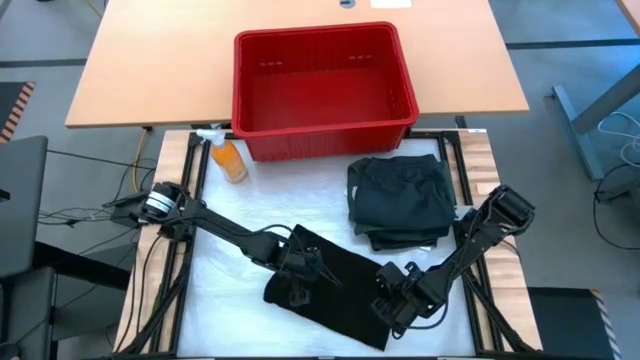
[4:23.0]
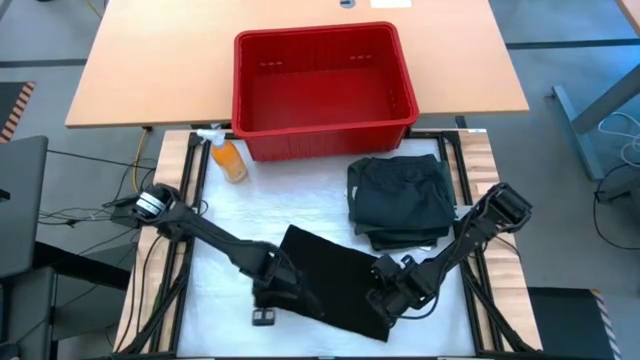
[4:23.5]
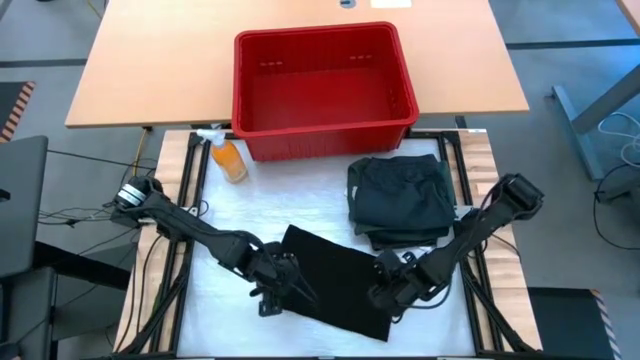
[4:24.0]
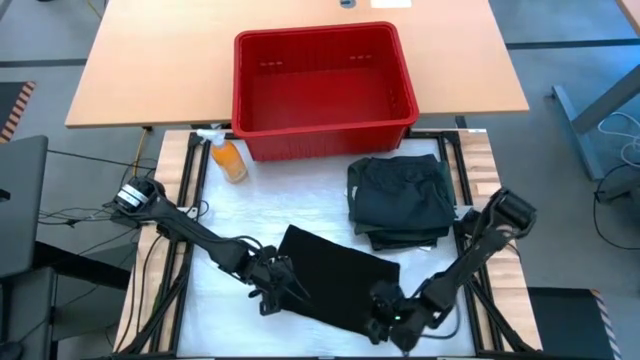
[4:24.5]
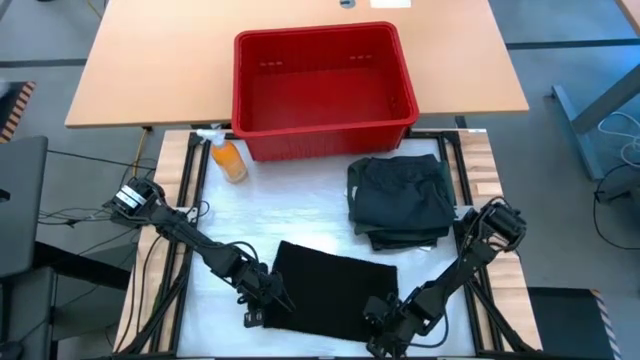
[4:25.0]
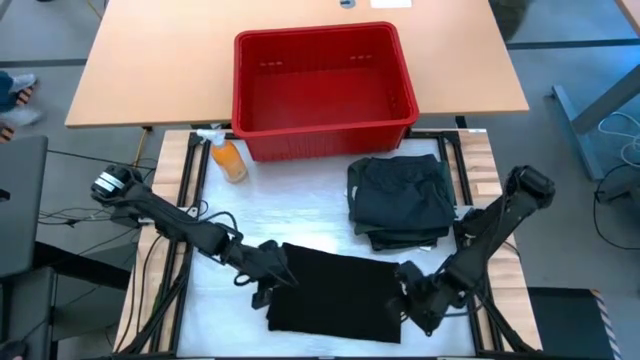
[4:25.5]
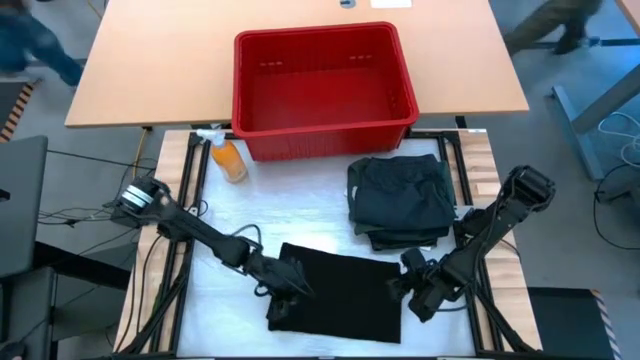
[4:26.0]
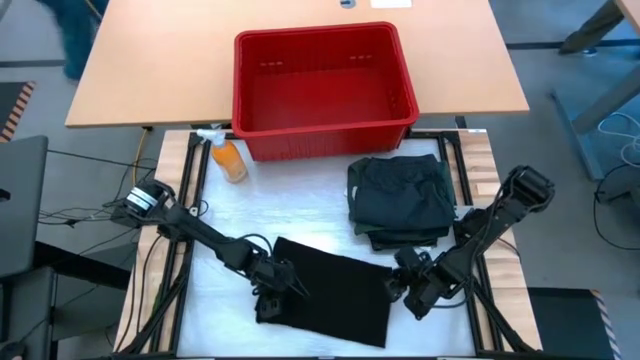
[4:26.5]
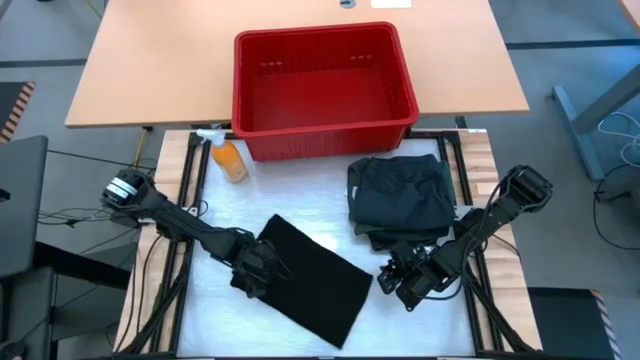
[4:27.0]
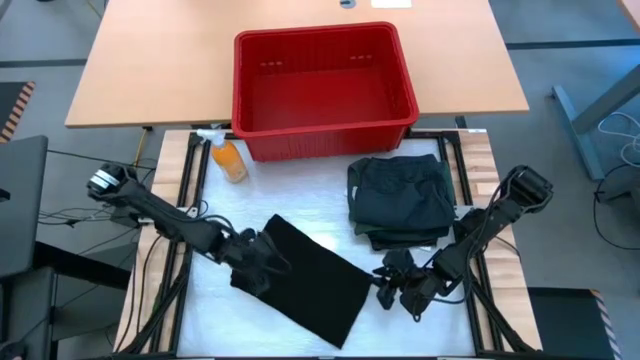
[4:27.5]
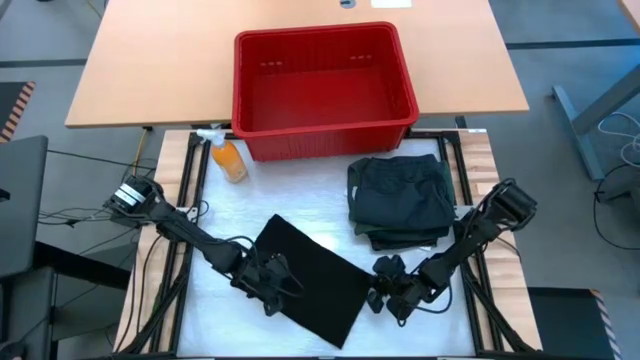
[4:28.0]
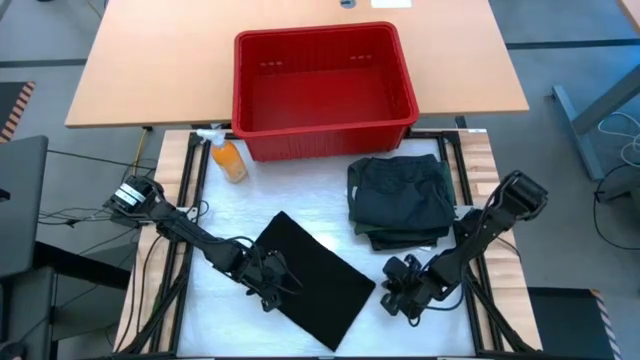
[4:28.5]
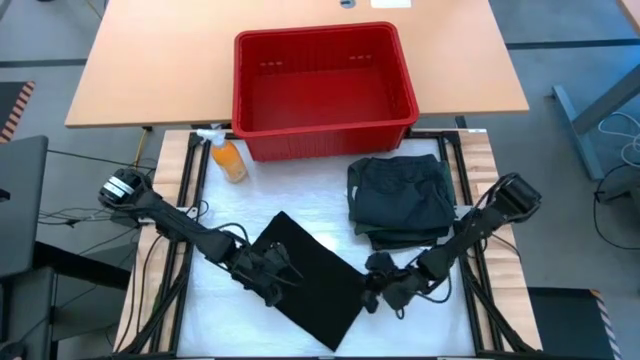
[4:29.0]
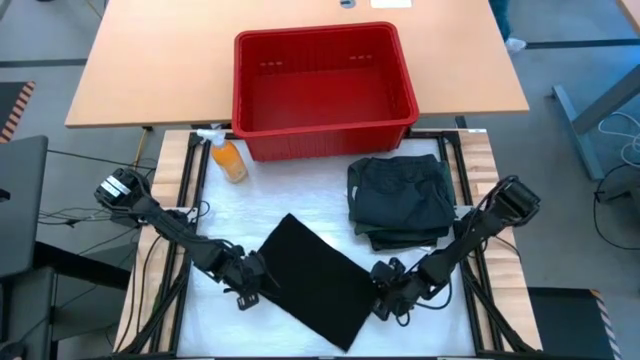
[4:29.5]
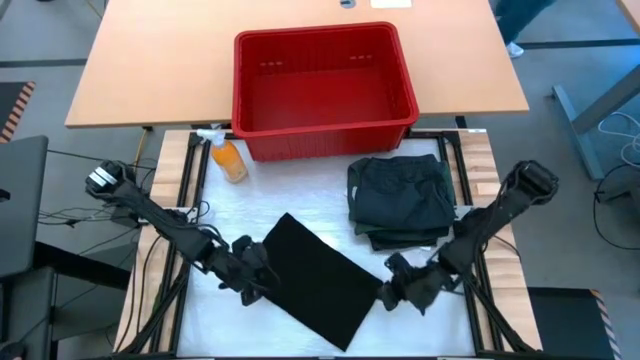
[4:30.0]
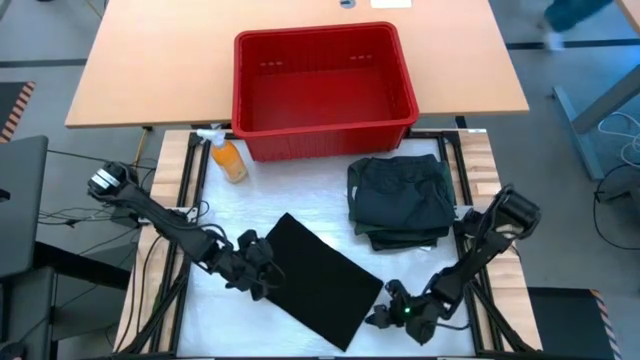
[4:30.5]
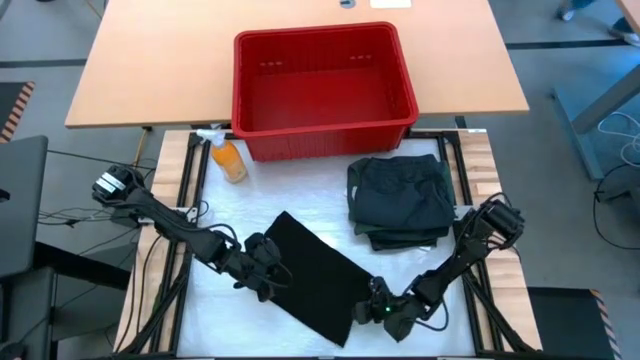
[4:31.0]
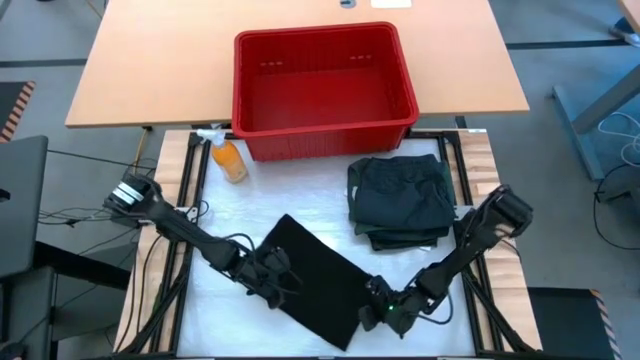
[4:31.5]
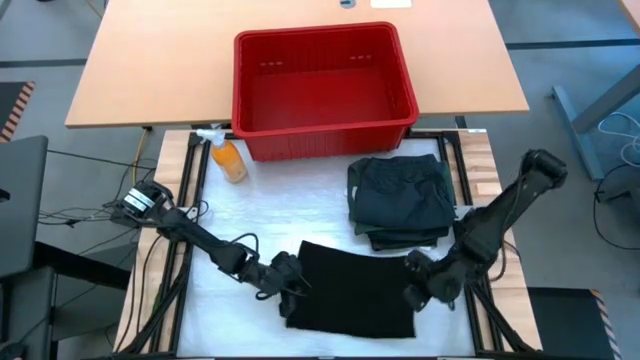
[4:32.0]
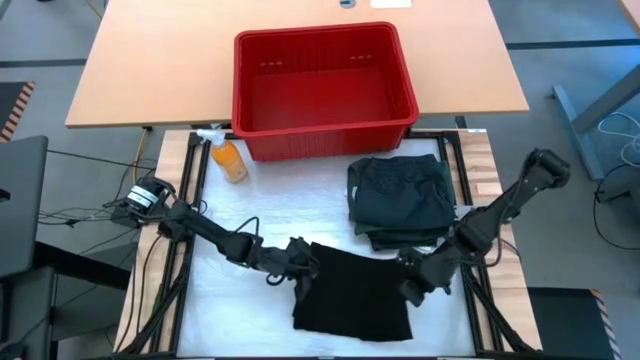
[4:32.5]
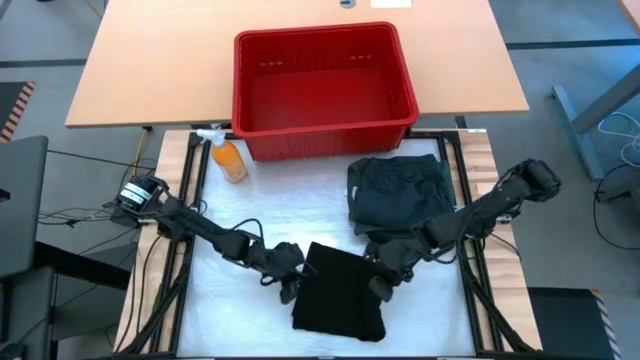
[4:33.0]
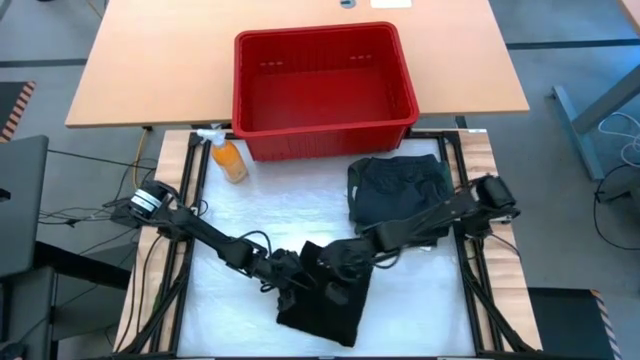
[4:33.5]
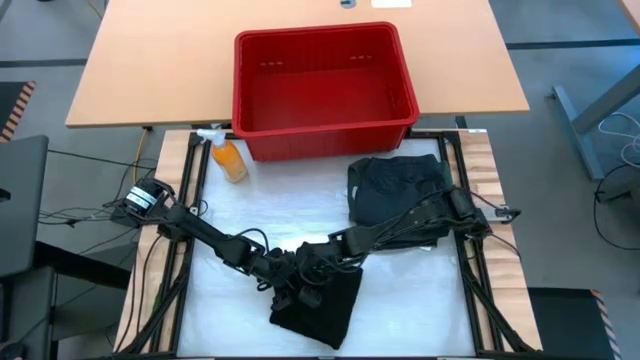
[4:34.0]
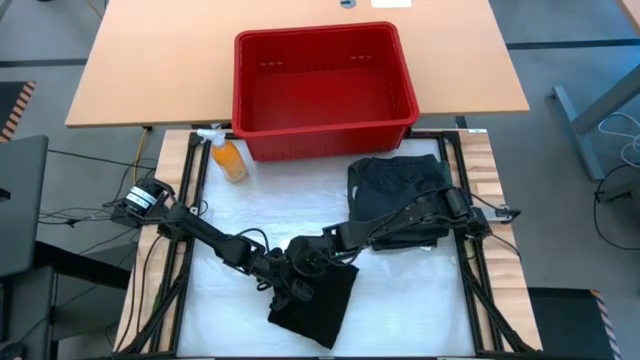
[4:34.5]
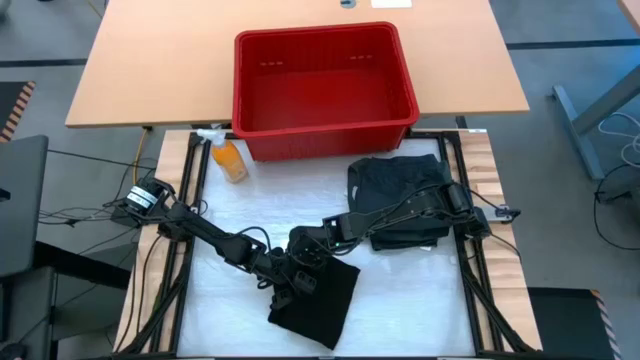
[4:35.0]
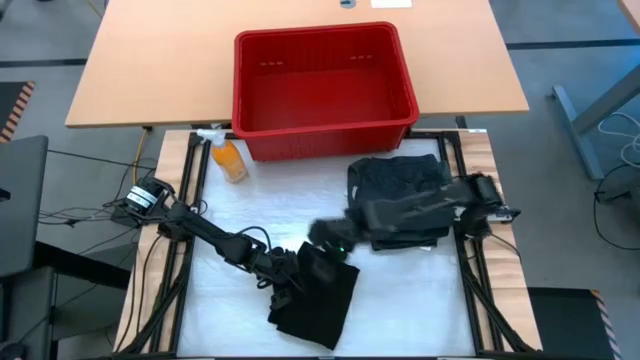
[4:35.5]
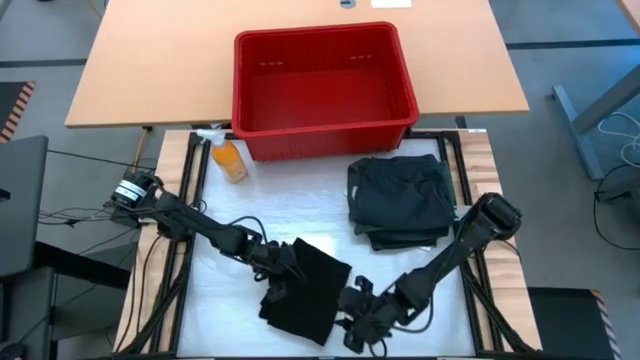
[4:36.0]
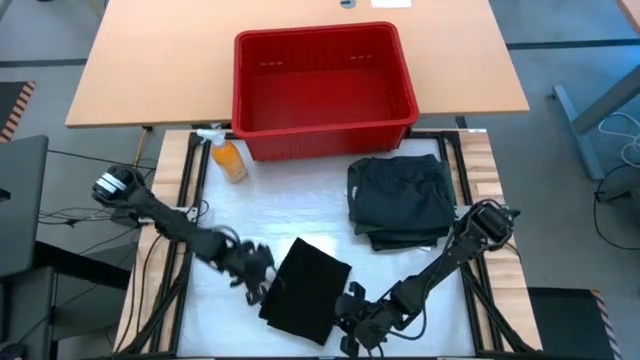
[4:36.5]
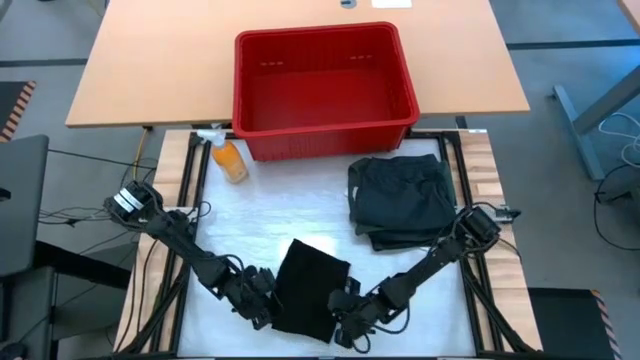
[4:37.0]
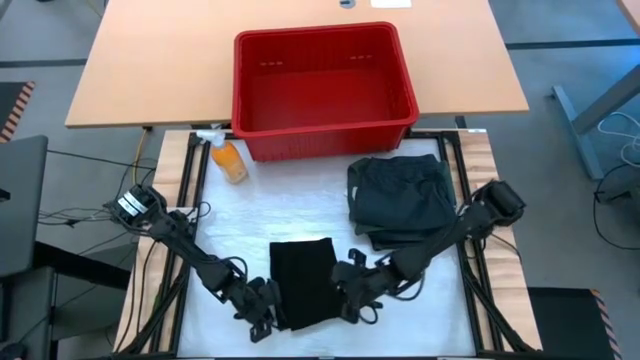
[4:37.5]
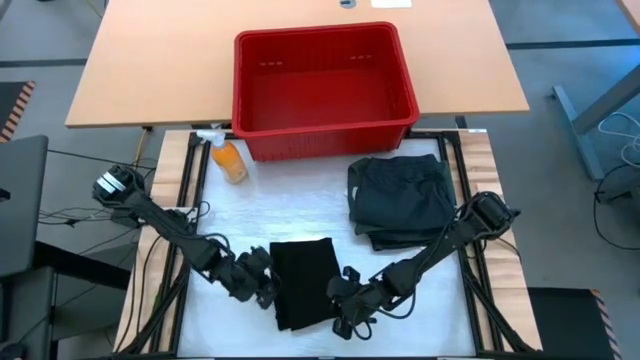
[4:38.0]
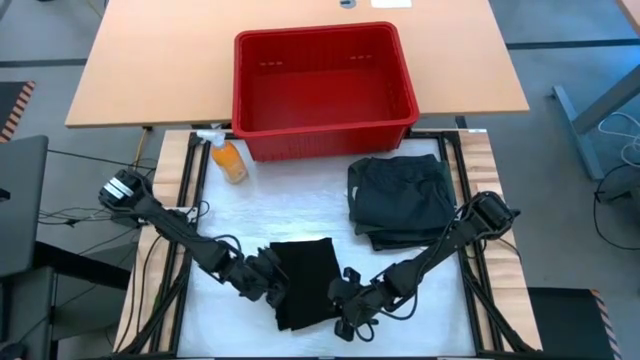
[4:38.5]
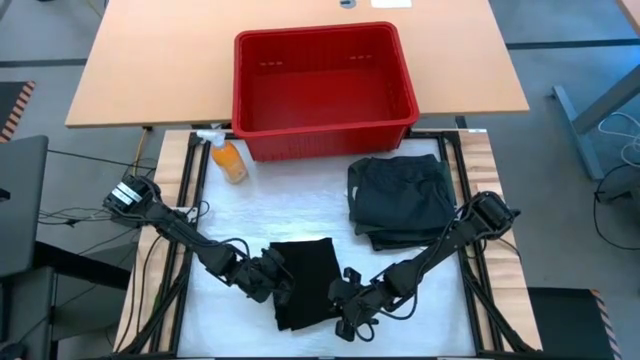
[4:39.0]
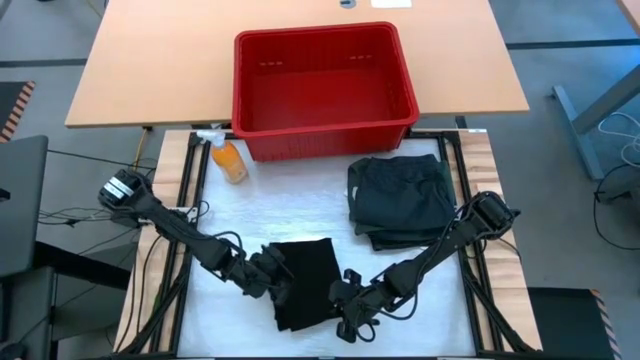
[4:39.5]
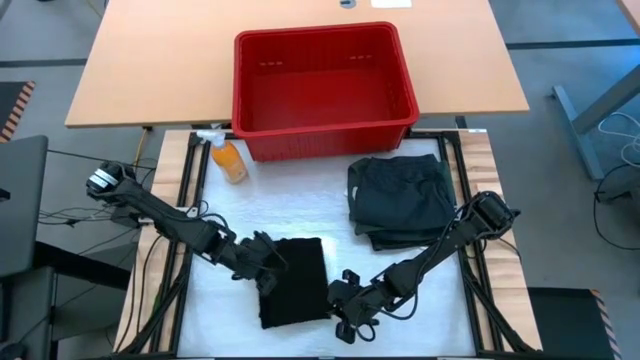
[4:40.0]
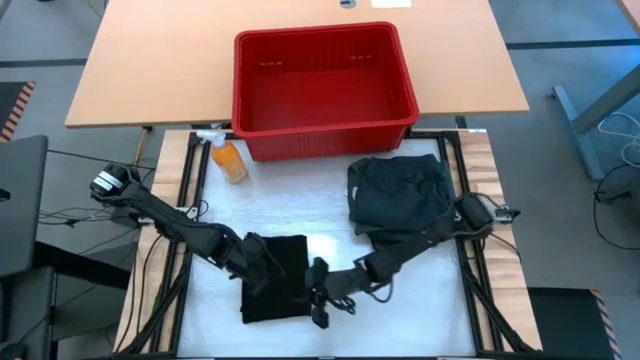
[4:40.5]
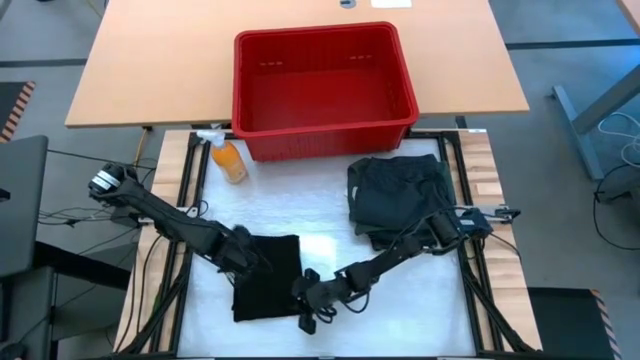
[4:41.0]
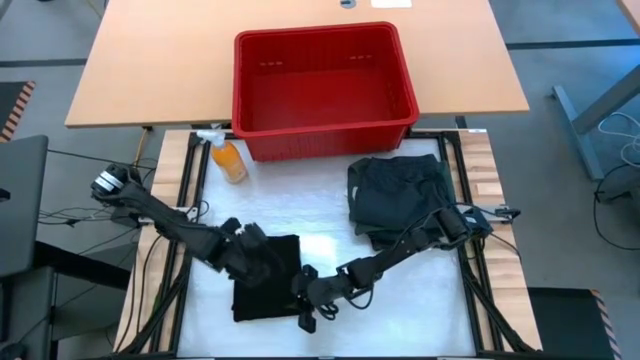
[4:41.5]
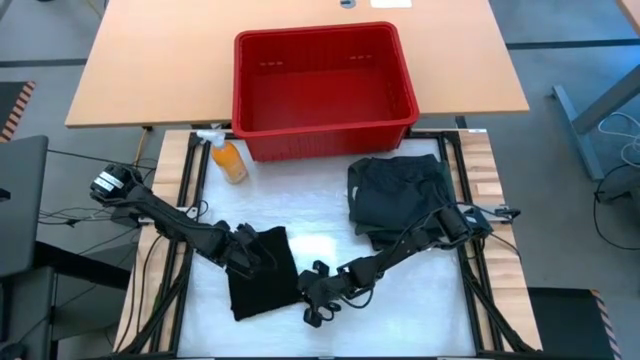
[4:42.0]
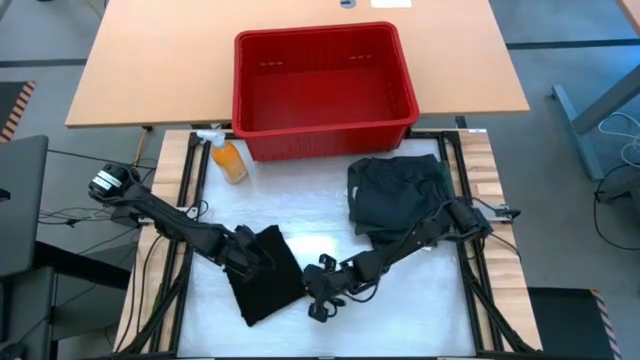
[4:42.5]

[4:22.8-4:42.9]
Task: Fold Laundry from Bin
Fold the black shirt

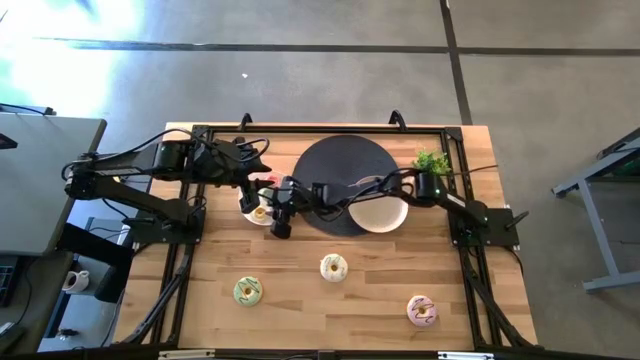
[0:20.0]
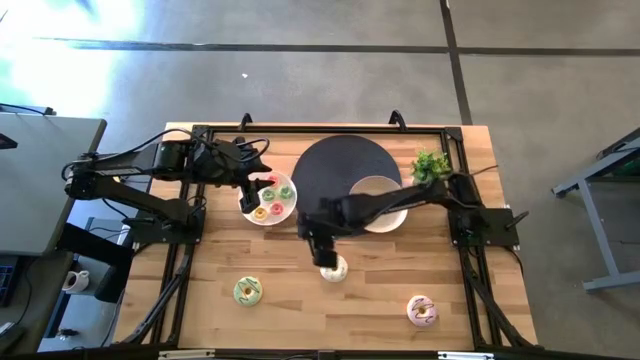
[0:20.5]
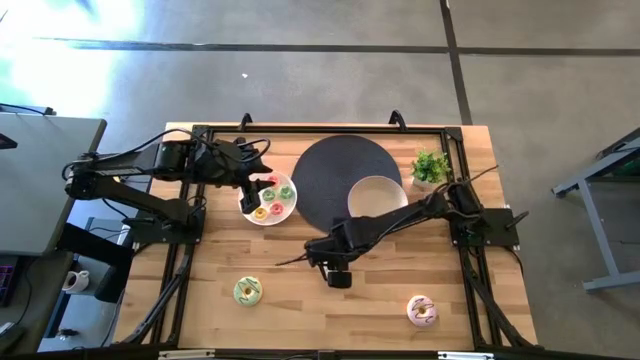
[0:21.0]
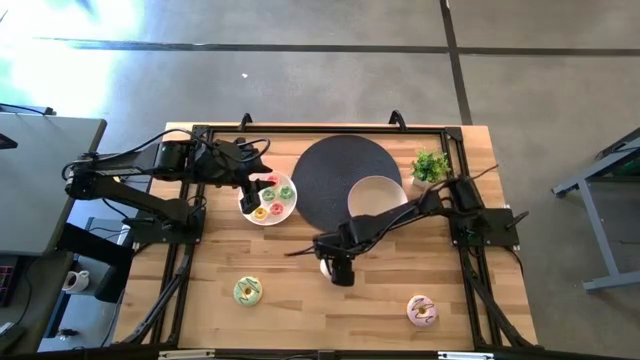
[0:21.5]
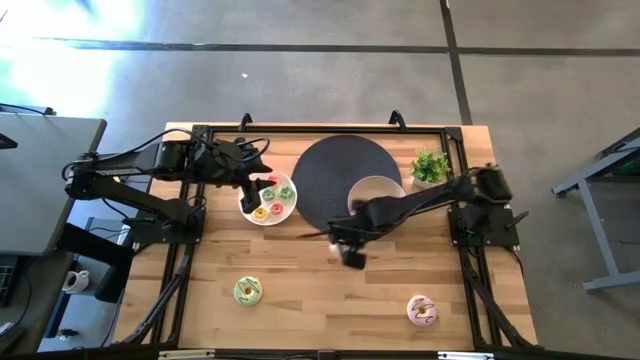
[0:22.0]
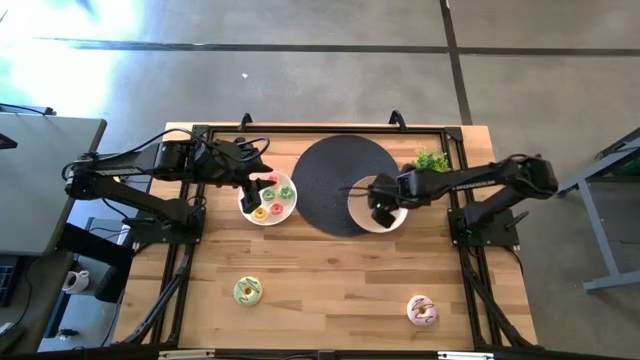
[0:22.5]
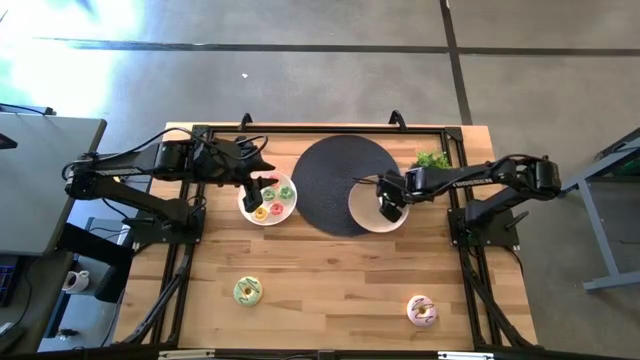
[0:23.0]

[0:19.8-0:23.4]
Task: Pick & Place donuts
Put the large white donut into the brown plate
